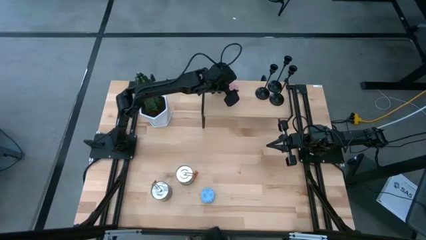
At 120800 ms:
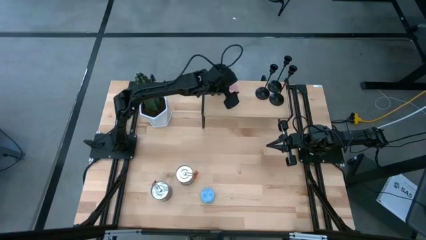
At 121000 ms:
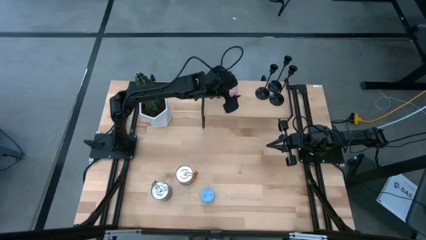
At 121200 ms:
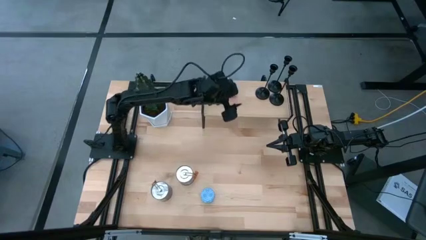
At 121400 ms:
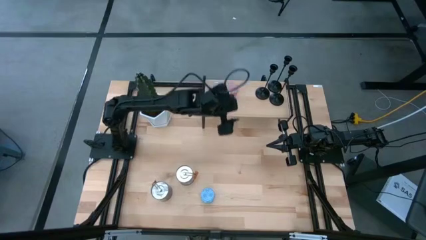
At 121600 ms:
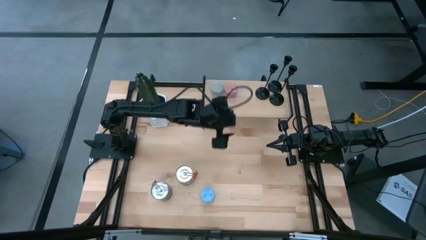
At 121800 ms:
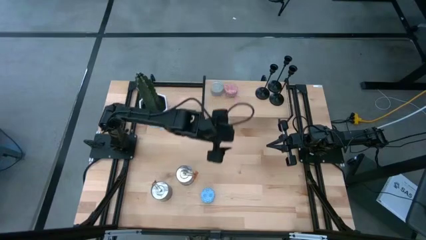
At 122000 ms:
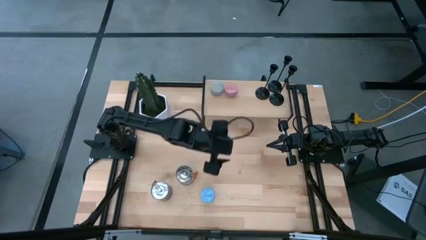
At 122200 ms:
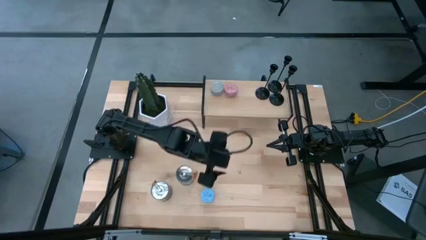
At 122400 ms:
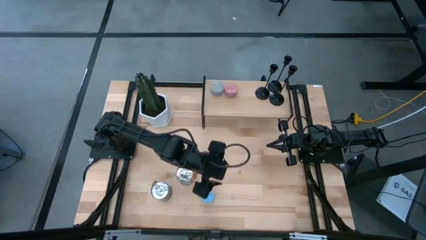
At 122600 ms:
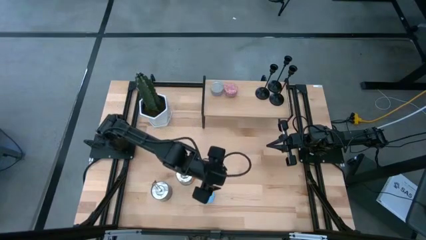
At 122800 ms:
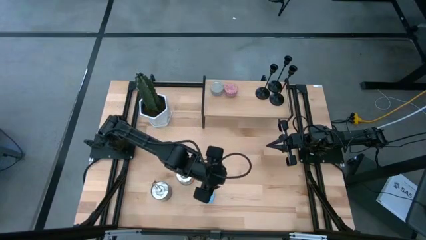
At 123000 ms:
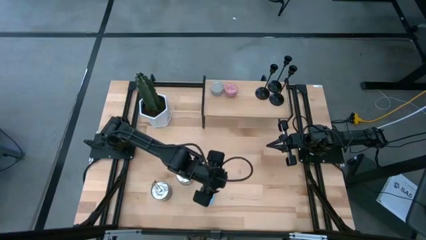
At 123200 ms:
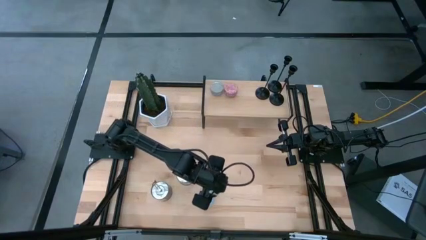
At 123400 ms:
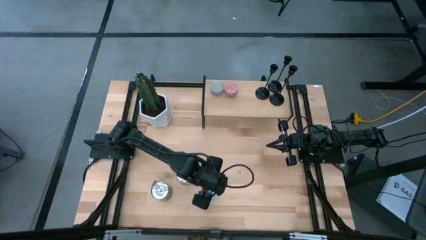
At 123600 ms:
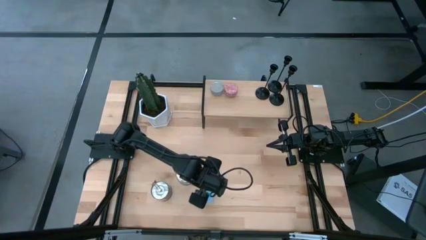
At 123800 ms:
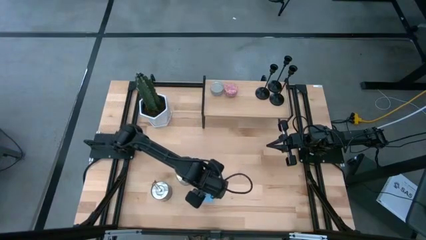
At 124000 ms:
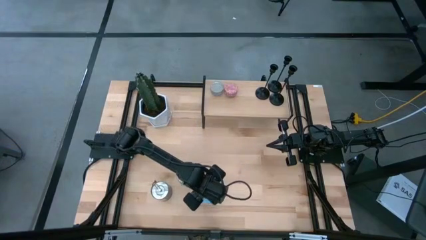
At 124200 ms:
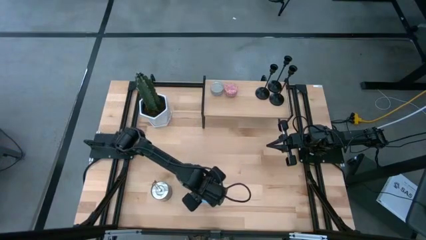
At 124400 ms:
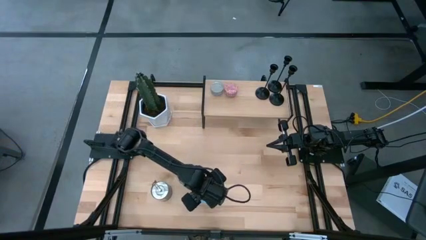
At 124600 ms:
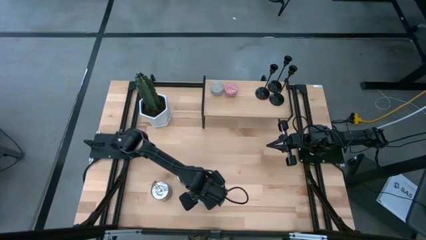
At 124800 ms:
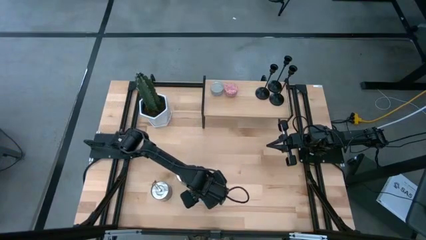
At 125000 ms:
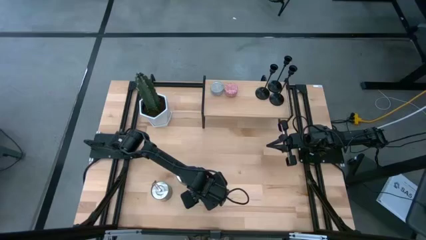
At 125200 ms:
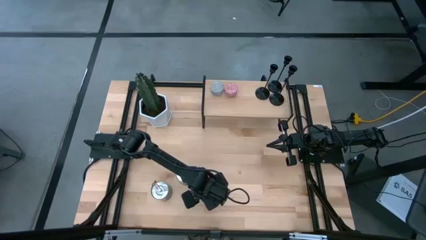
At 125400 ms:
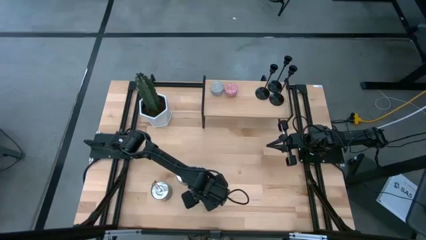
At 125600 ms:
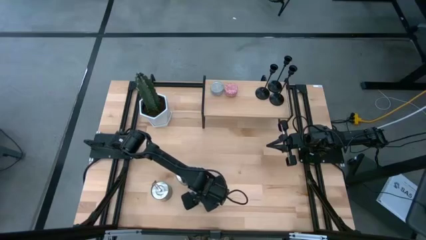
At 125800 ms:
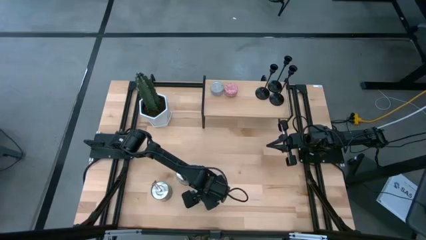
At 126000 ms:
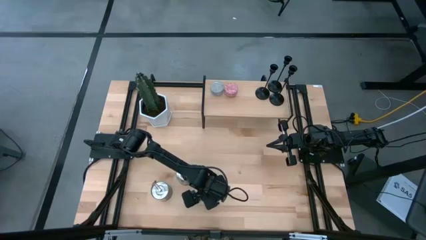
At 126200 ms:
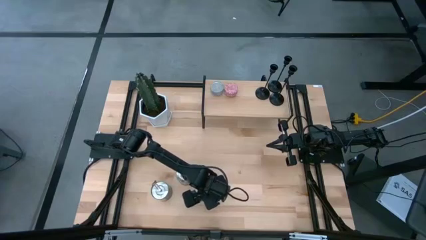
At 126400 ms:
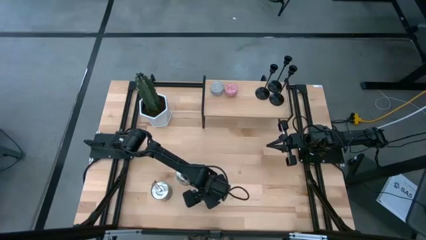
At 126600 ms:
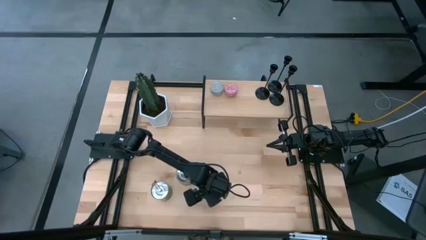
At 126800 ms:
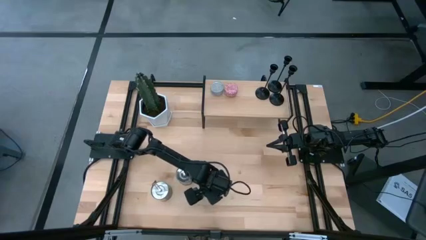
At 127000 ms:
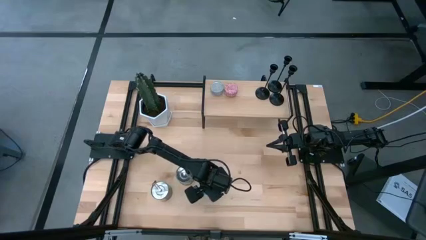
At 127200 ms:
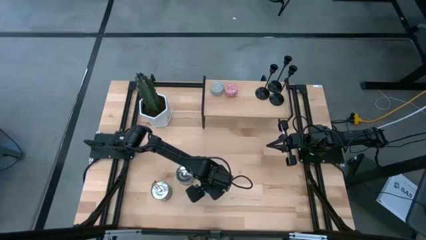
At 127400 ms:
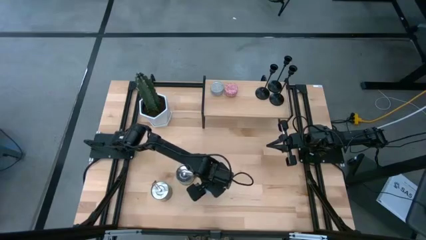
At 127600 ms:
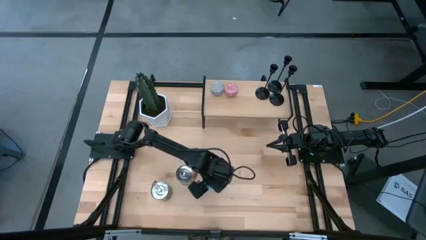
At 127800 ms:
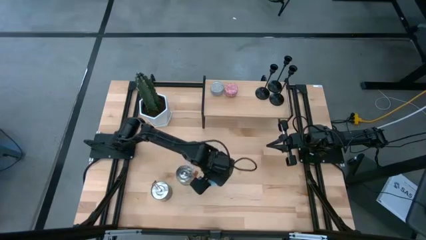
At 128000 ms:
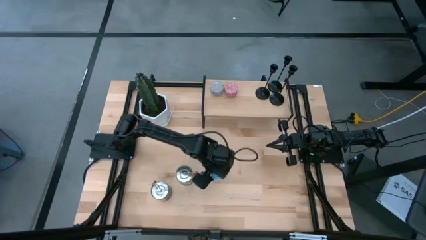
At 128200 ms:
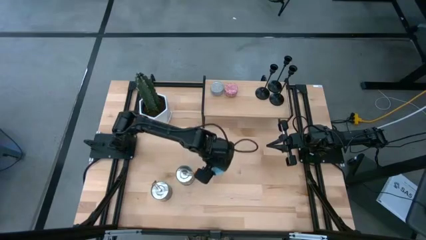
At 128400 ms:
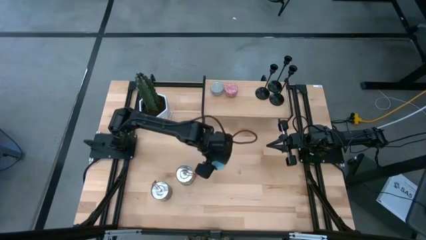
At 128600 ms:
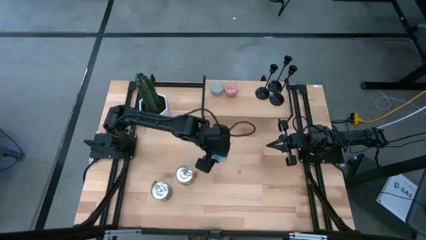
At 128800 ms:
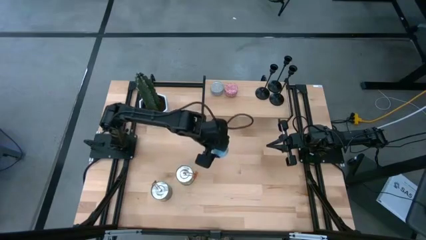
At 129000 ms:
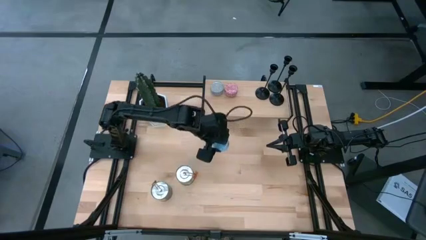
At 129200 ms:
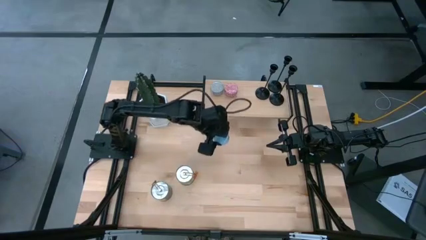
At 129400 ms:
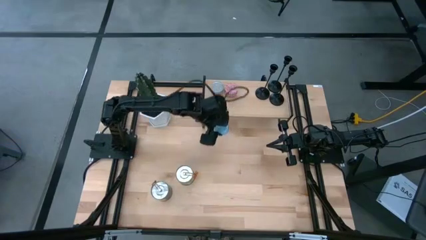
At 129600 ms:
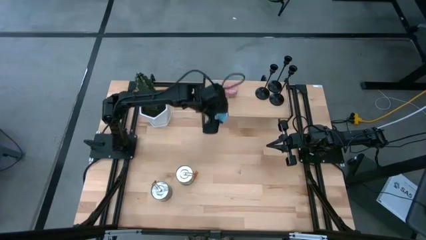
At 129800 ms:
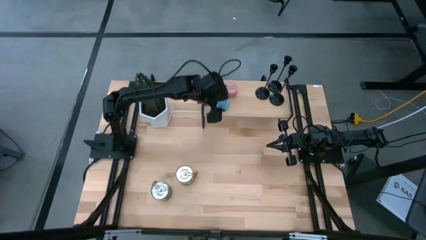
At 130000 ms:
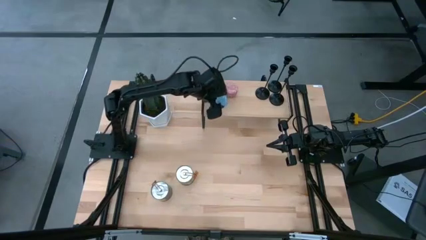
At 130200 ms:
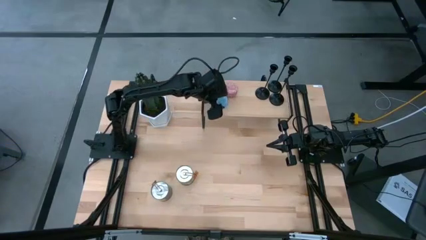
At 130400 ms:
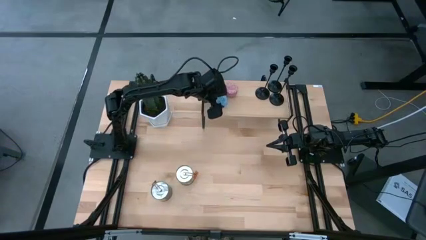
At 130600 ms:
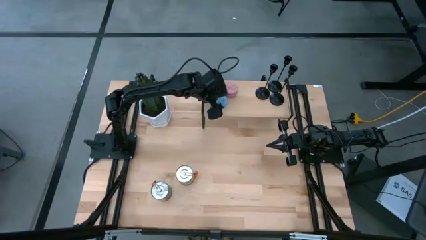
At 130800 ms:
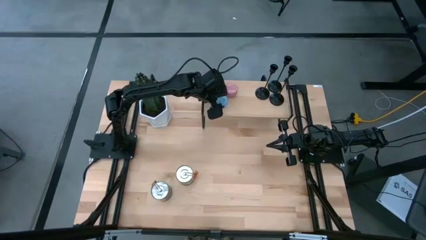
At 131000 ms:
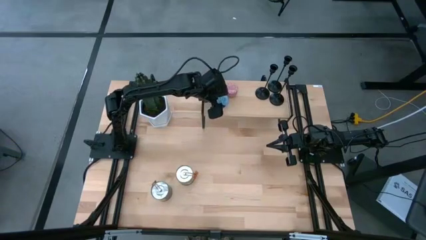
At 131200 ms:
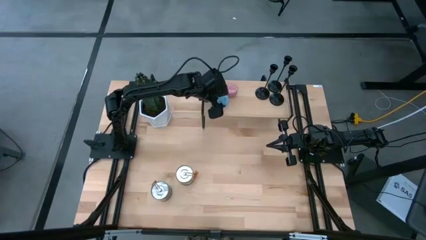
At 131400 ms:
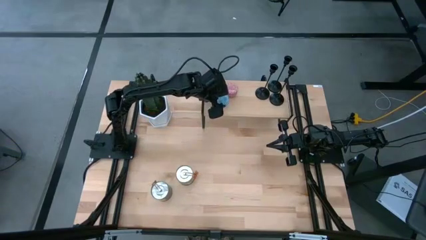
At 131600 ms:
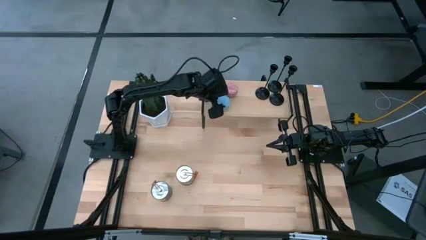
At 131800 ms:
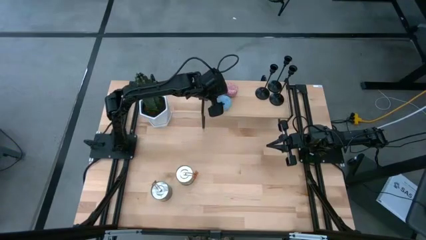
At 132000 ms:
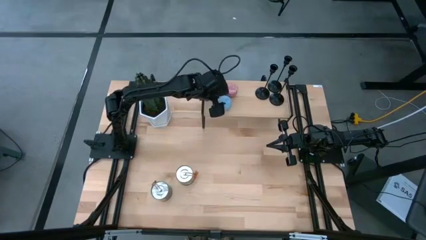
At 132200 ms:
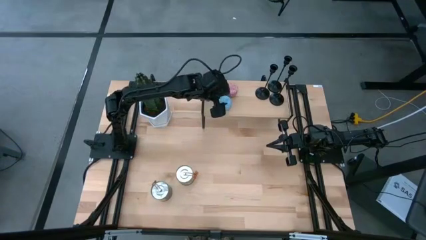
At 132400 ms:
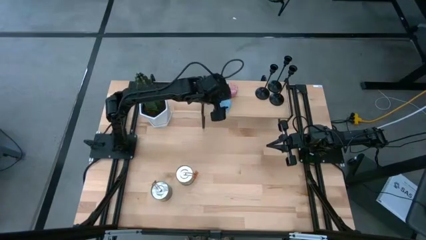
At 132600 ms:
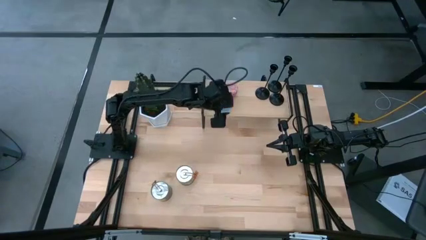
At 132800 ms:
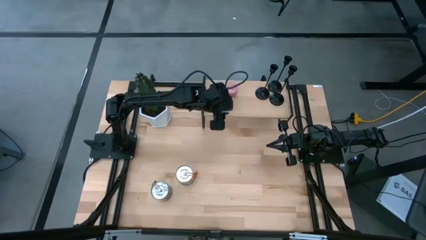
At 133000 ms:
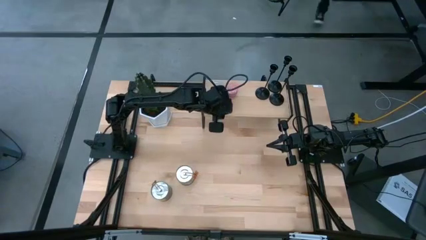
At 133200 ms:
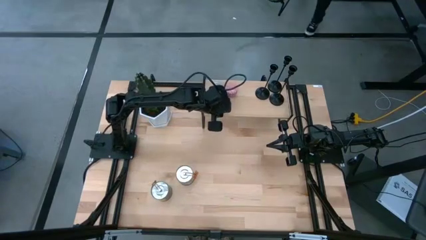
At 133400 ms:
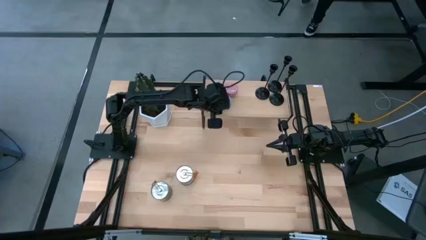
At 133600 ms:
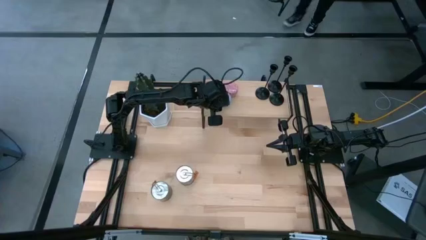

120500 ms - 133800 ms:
Task: Pick & Place candle stick holders
Put the blue scented candle on the shelf

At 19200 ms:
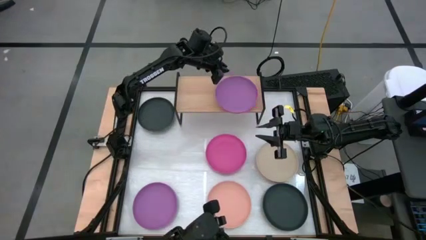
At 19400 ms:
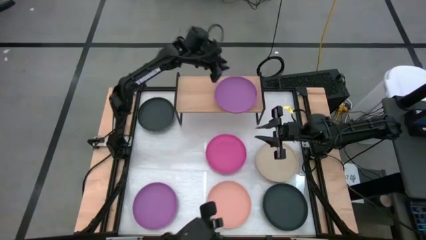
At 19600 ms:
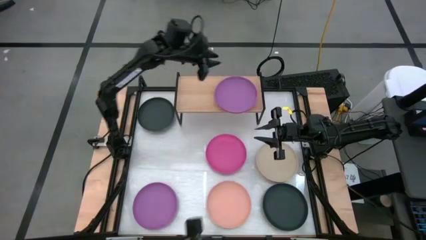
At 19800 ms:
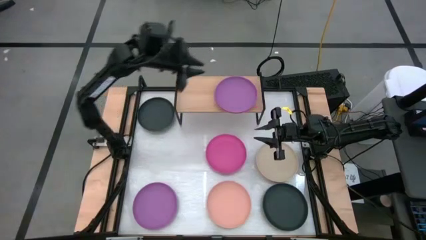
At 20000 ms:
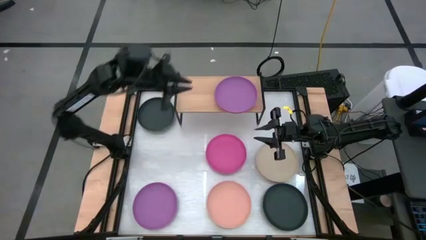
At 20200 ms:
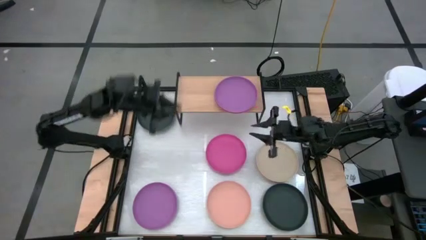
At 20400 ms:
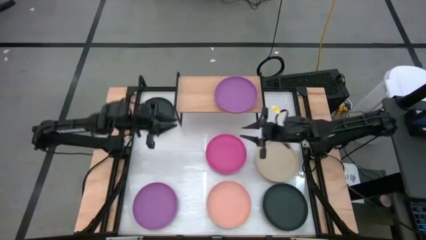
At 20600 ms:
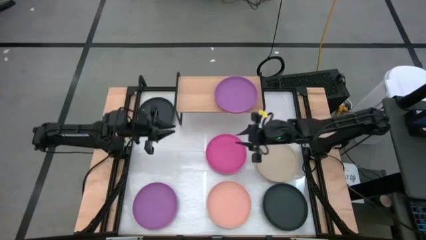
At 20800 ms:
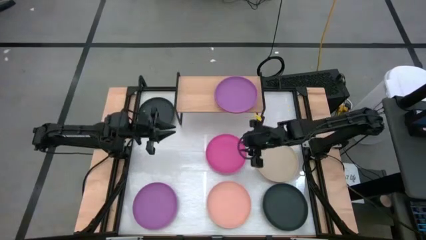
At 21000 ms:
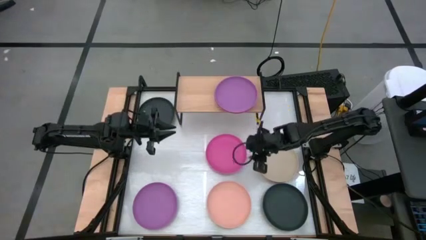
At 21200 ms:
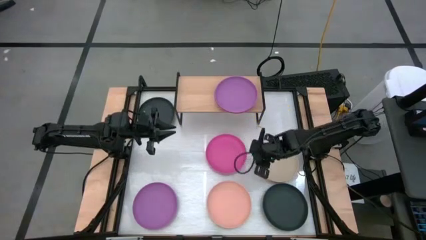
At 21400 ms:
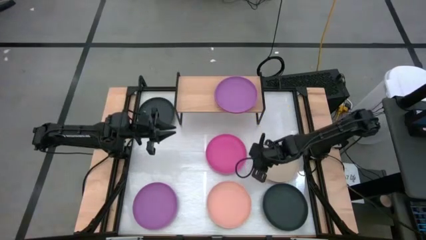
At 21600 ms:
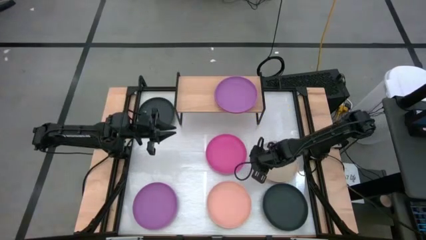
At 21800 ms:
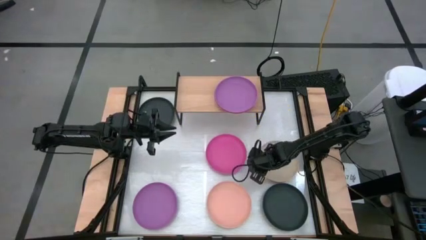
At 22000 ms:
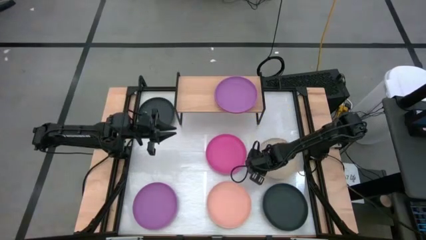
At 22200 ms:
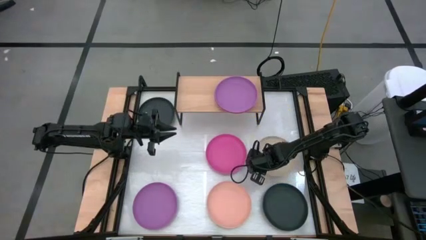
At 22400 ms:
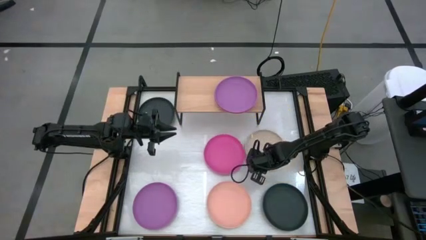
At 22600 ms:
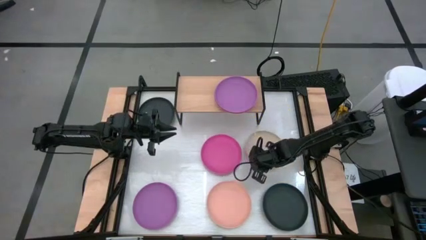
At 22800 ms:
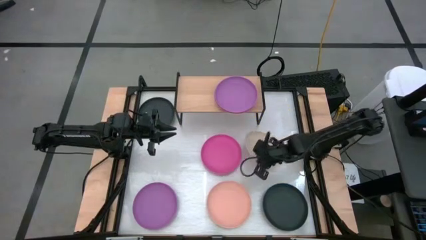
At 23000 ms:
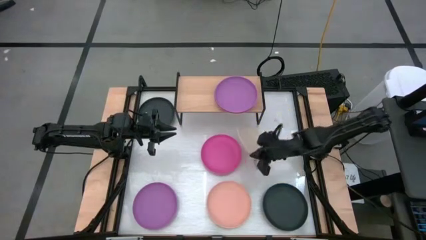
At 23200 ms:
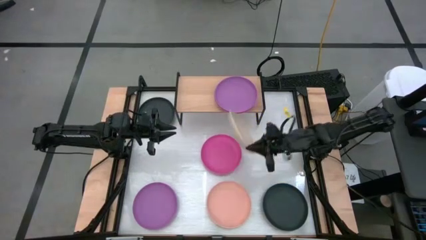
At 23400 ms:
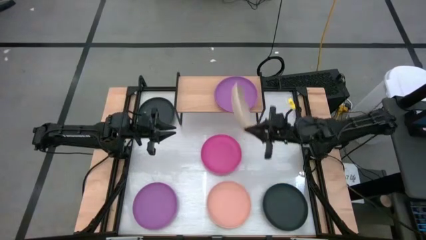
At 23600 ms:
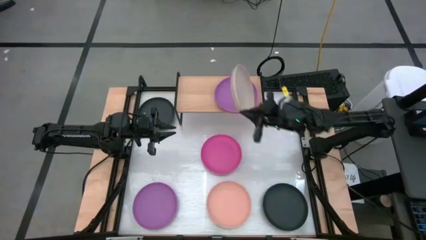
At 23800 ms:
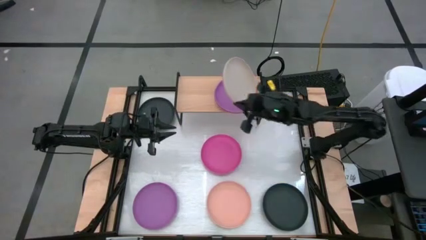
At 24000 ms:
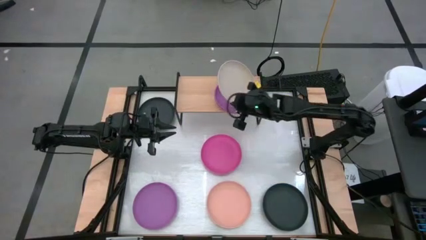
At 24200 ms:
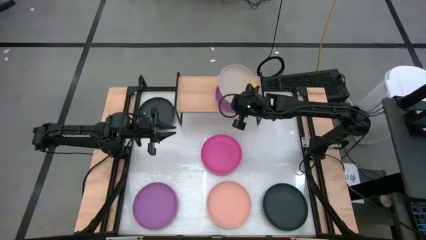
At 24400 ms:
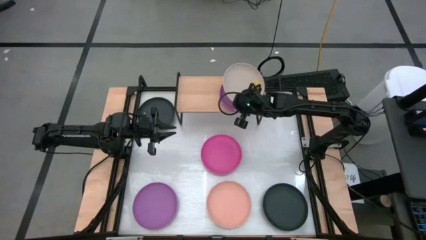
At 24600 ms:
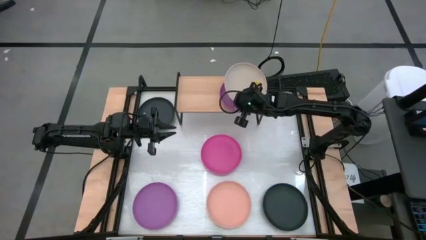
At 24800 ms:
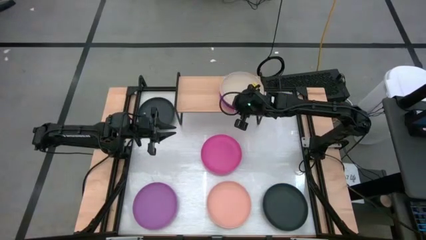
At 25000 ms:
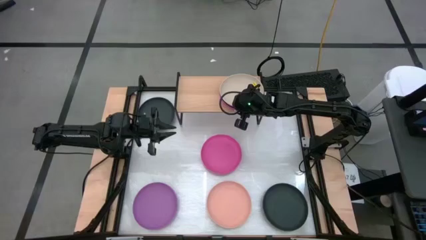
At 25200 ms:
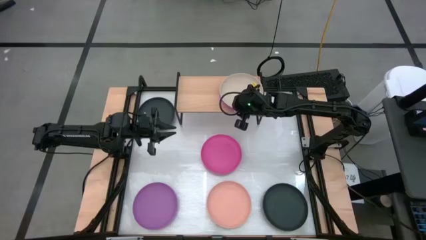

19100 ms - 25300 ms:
Task: Place and stack plates onto a shelf
Stack the gray plate on top of the purple plate on the shelf
